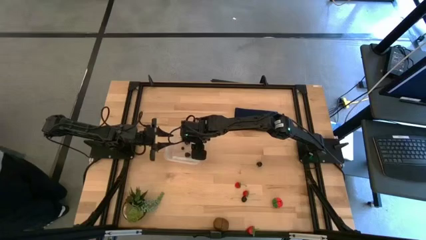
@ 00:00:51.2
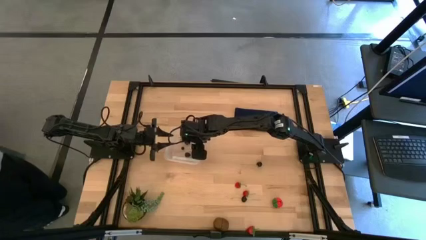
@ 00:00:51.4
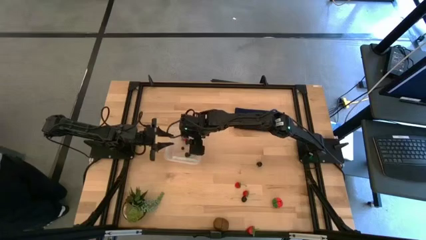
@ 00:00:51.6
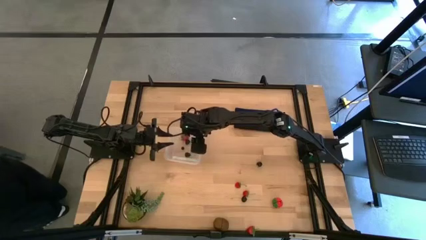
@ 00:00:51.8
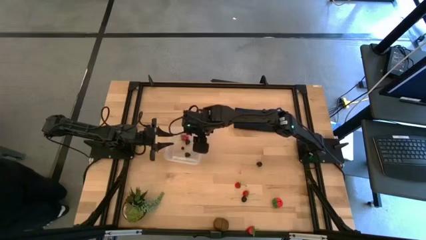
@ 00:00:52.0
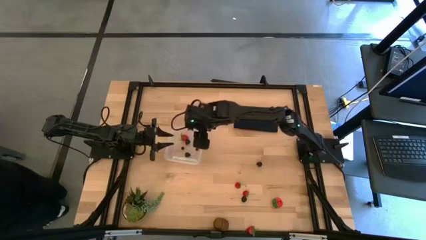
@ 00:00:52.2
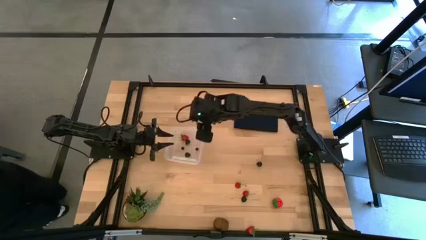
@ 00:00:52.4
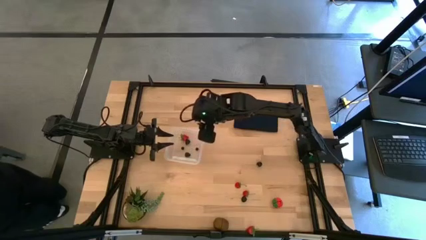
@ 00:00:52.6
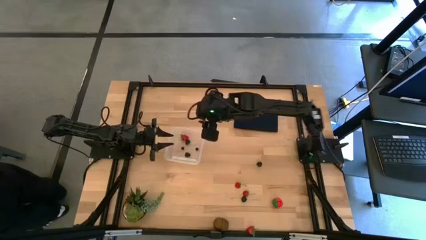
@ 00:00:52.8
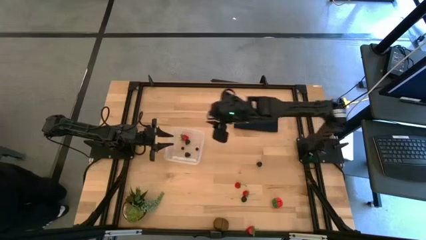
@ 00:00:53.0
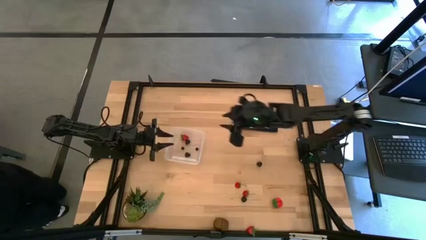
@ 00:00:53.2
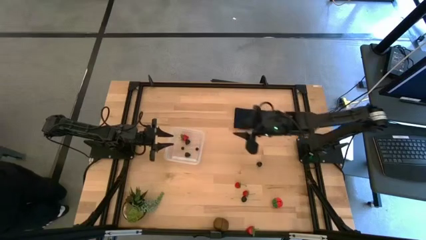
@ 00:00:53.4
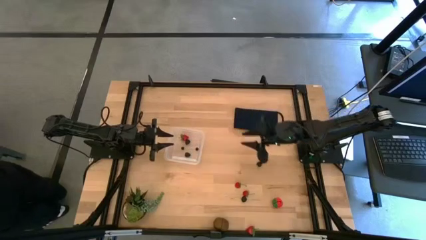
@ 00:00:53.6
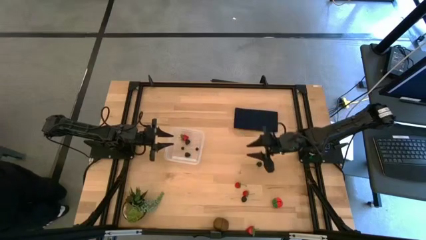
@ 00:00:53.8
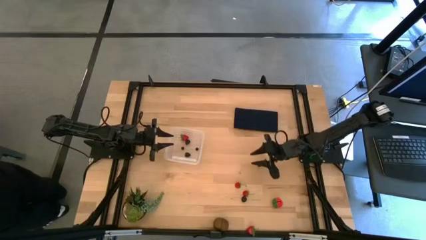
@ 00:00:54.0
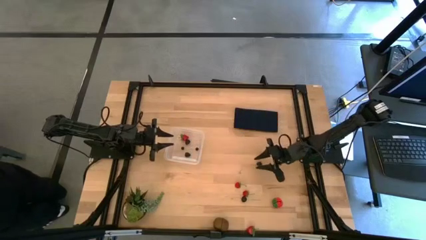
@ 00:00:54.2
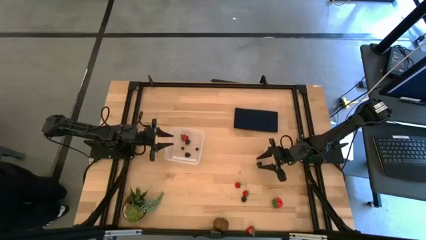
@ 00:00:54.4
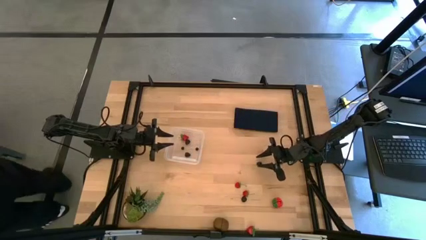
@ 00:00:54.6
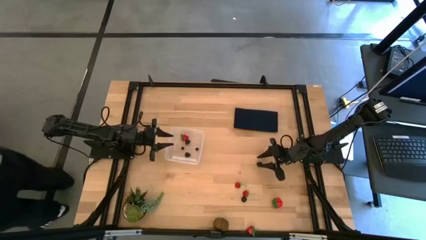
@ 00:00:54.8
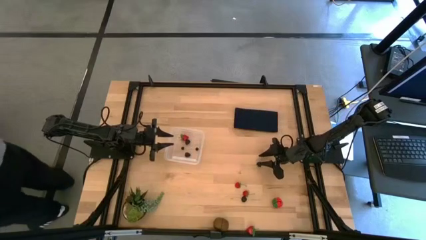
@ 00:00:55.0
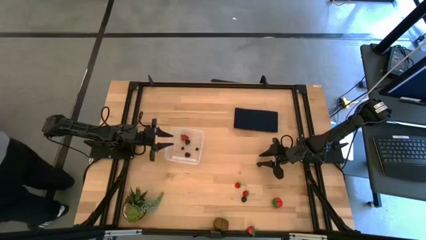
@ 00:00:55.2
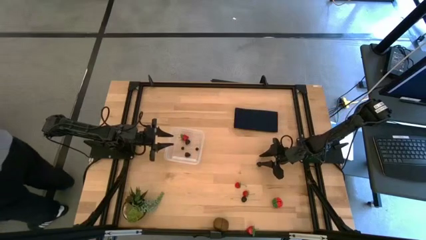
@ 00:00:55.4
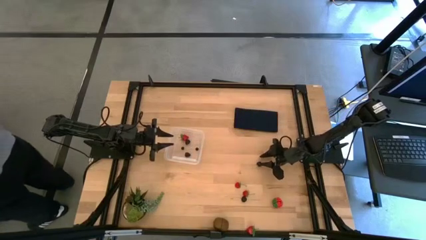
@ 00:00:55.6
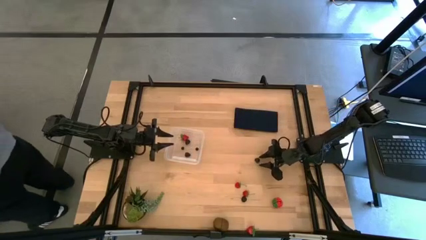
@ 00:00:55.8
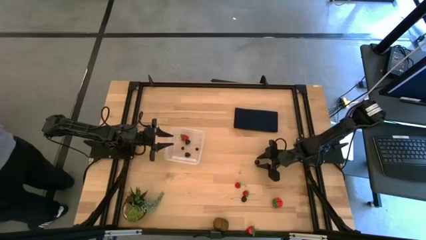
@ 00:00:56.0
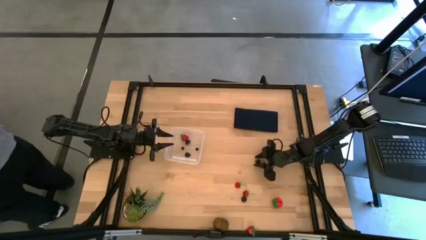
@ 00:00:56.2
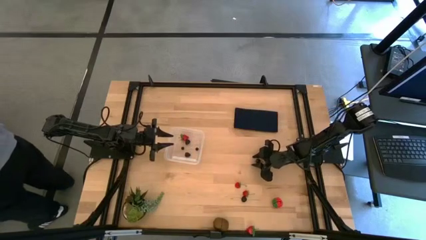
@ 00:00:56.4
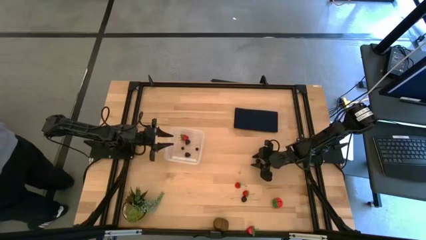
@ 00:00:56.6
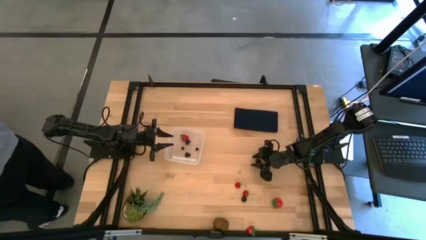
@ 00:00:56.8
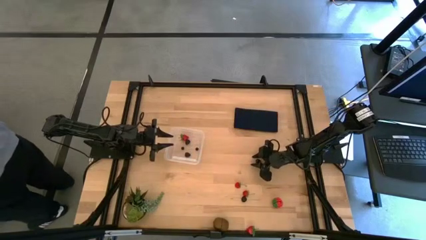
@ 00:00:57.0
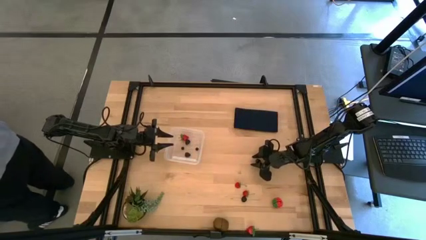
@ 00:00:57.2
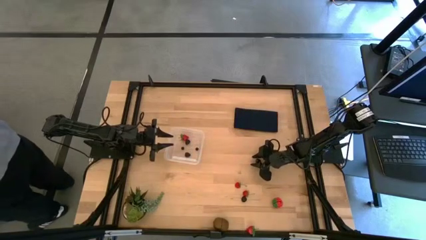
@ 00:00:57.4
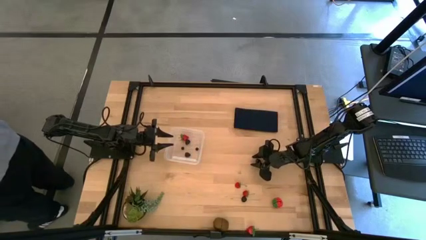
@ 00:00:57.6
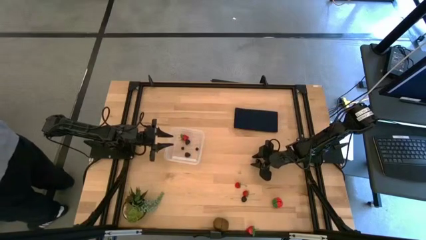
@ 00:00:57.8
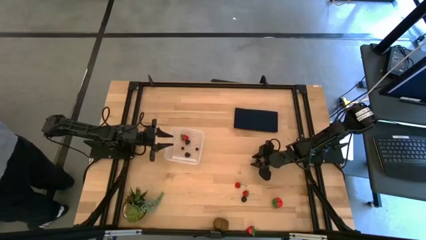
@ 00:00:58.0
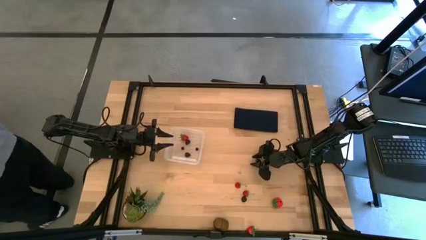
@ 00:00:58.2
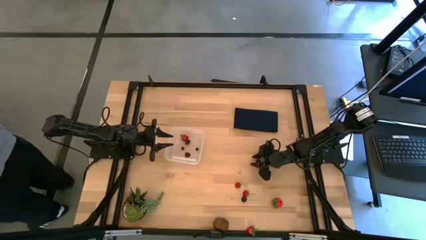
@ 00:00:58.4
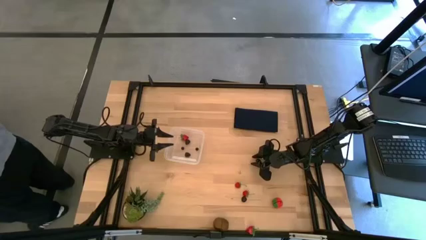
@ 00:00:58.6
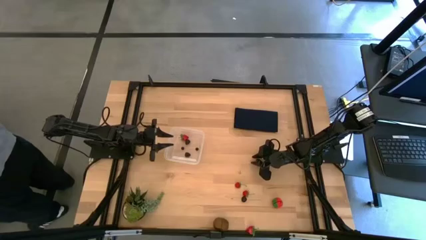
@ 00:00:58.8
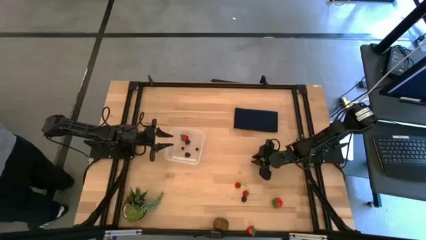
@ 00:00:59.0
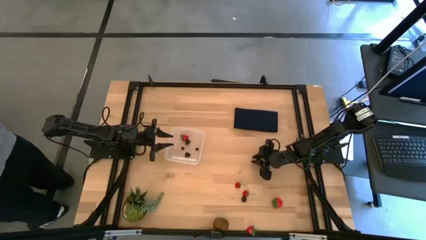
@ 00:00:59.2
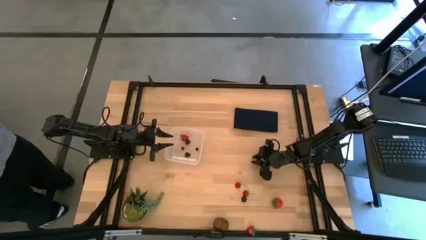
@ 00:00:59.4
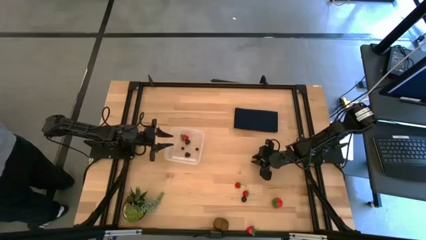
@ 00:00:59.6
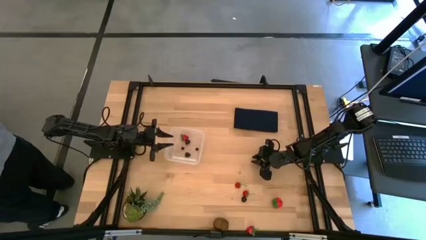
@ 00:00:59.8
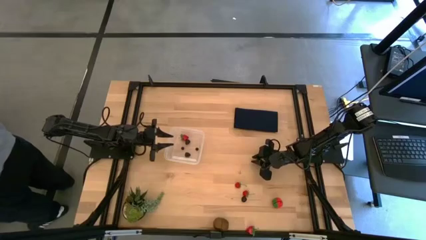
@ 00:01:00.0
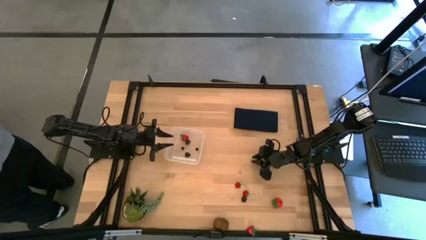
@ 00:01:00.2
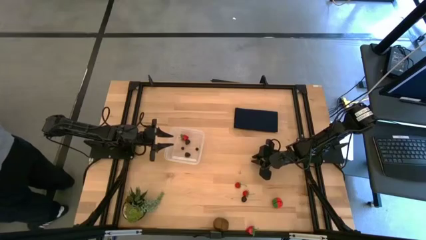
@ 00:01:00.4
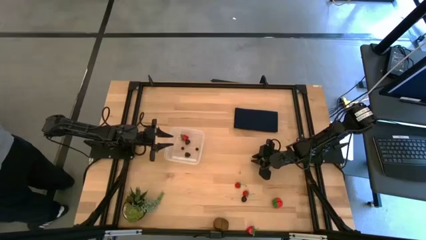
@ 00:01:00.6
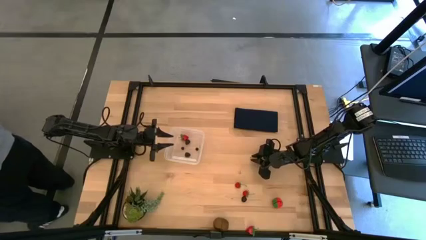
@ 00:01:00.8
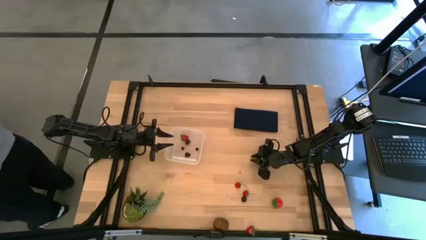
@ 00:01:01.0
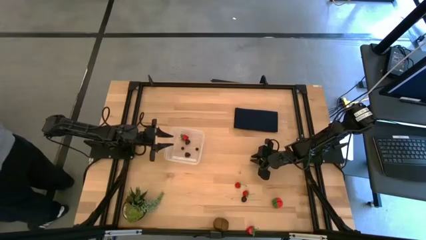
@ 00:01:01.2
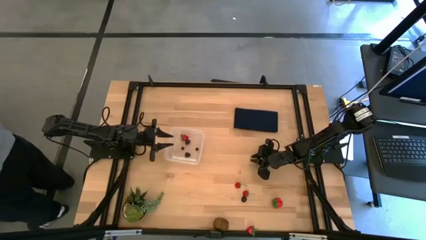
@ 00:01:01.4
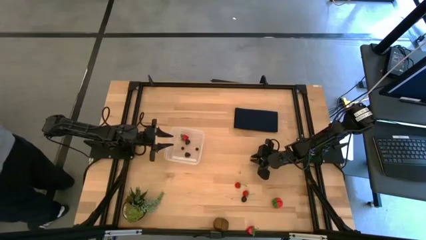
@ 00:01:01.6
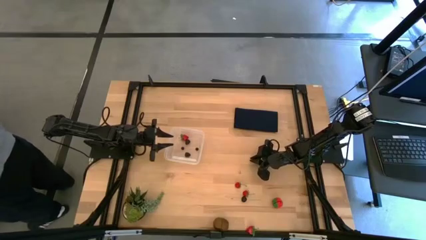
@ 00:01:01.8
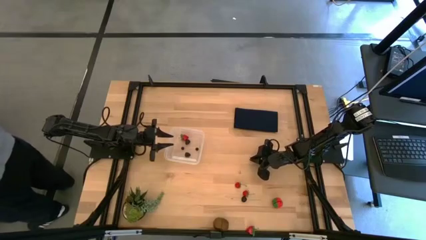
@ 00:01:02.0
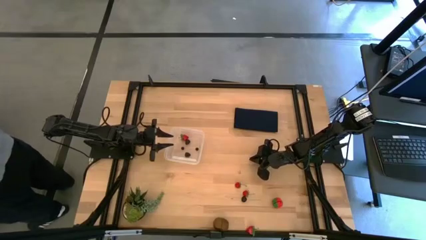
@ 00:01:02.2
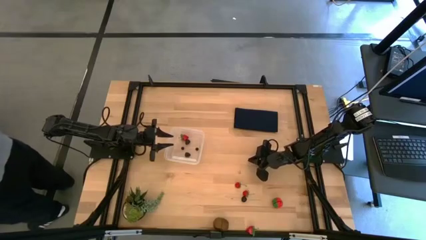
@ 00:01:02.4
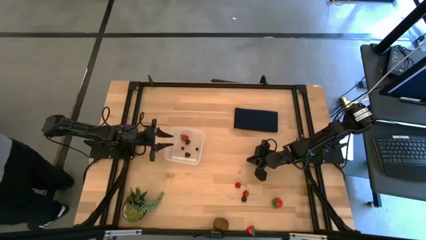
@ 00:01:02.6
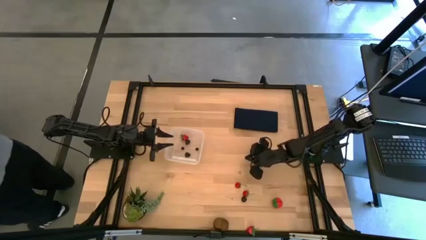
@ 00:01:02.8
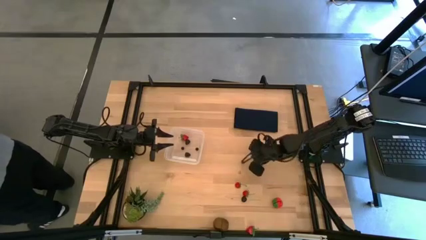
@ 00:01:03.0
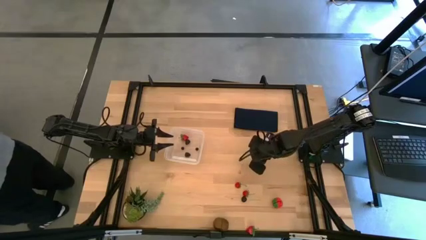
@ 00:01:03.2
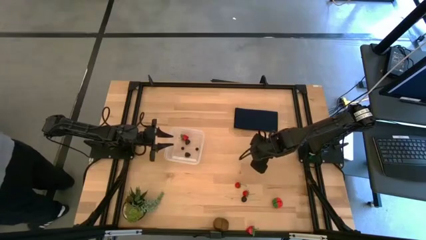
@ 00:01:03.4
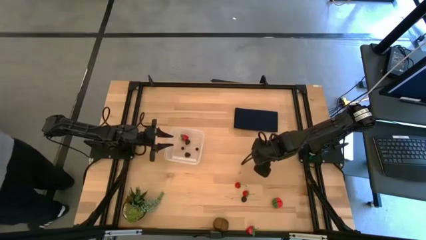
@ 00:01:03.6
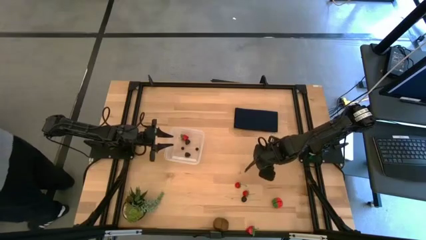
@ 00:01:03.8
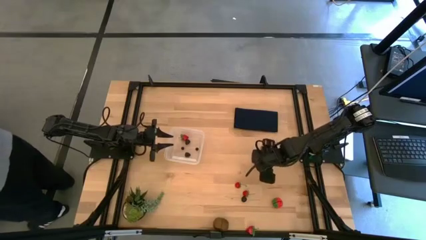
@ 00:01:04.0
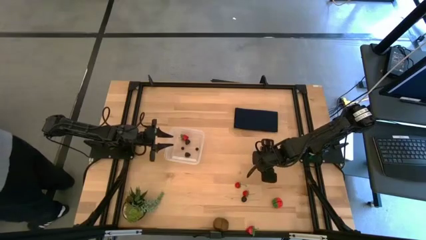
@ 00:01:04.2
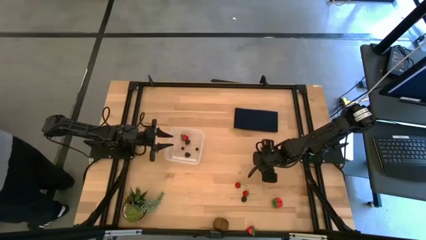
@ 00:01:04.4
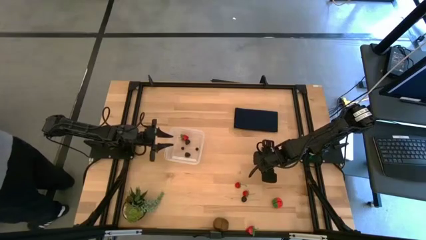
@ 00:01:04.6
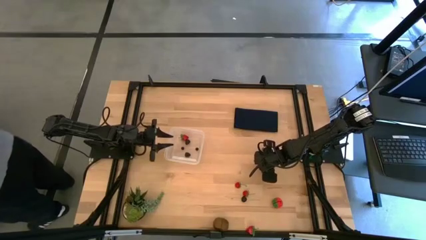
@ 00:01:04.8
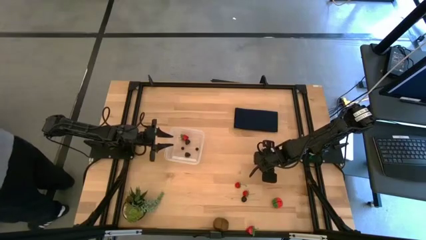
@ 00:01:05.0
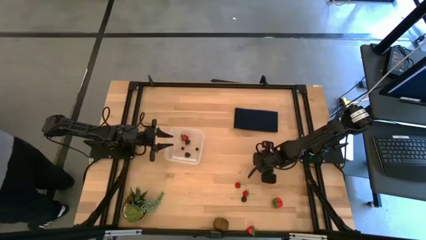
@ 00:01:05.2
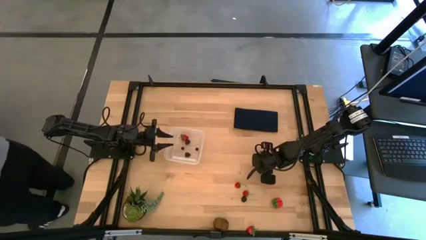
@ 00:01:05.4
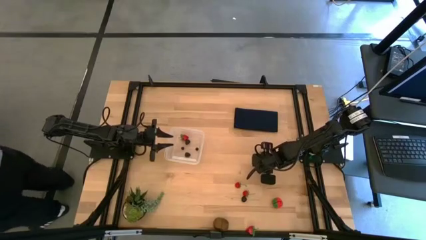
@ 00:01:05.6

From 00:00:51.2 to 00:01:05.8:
Task: Pick and placing Produce into tupperware
Put the right black cherry into the transparent bin

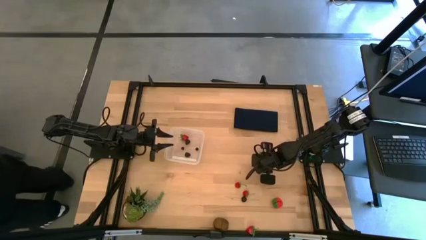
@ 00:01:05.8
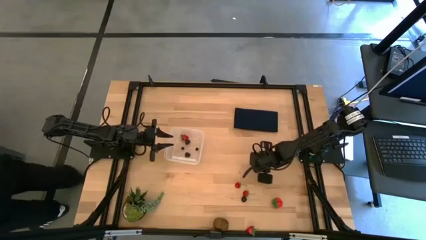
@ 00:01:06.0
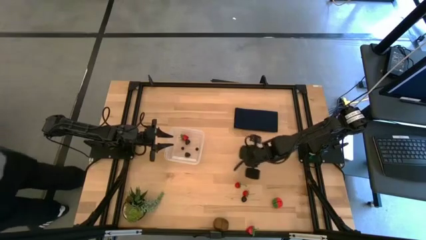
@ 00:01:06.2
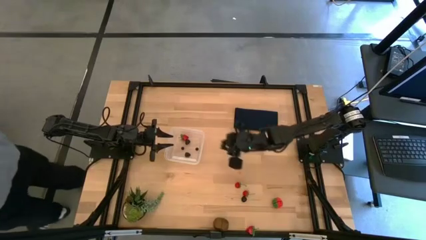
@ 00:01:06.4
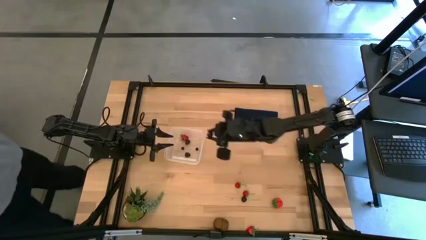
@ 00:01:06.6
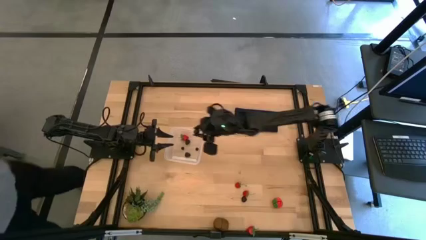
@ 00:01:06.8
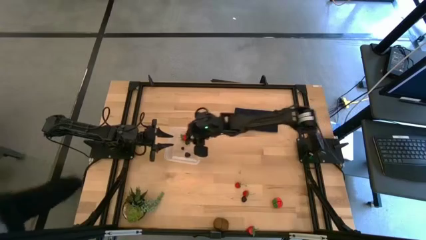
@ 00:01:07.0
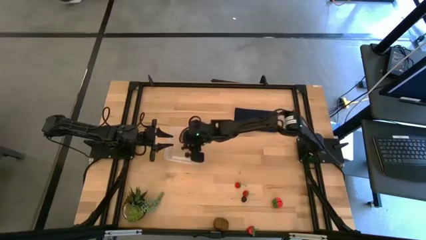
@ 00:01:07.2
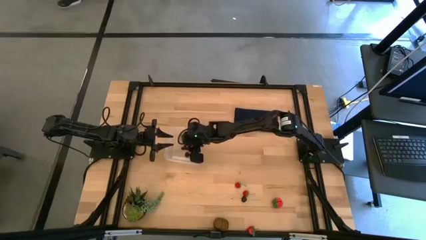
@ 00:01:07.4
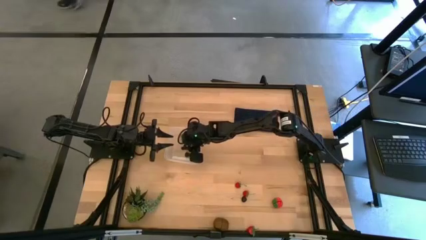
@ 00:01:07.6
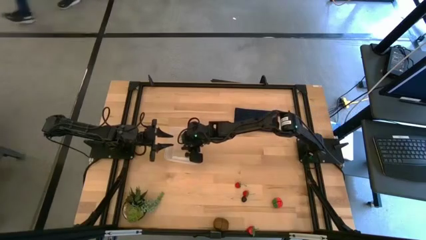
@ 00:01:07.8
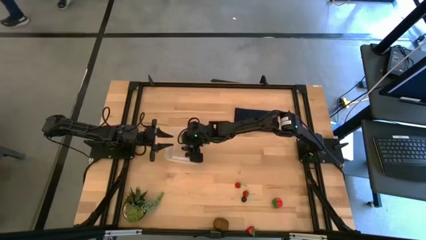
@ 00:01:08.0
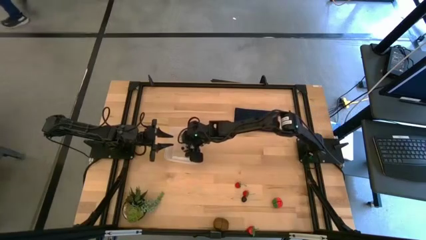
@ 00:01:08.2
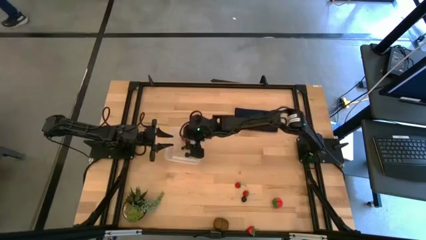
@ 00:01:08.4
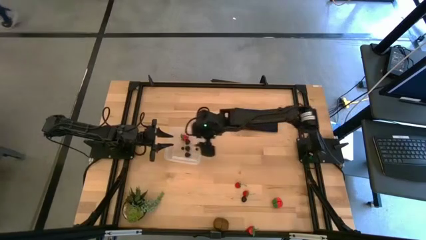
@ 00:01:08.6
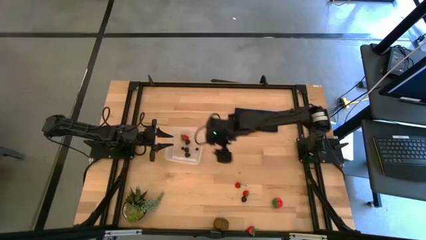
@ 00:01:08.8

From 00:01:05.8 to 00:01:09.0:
Put the right cherry into the transparent bin

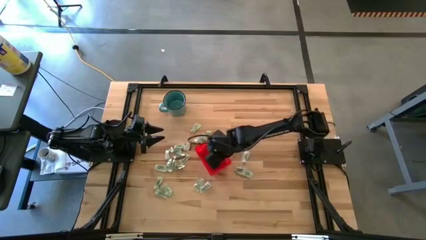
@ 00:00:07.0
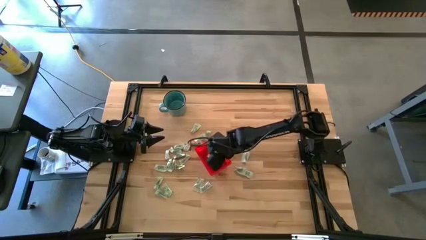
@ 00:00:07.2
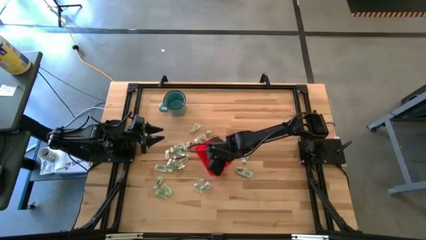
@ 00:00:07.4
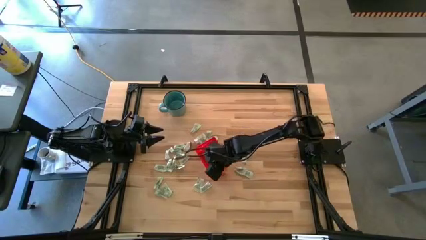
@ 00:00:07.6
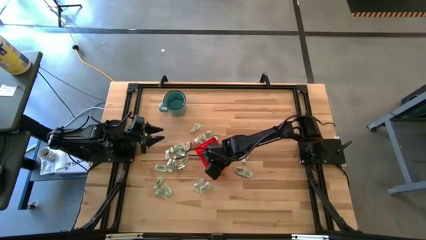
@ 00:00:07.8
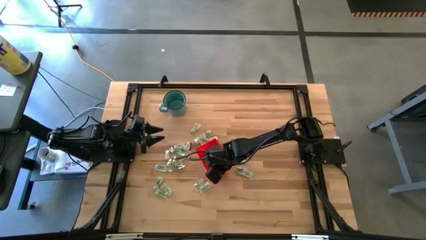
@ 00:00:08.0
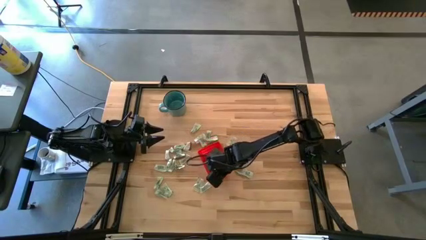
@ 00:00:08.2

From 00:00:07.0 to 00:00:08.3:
Task: Pick and place Stevia / Truvia into bins
Adjust the basket
